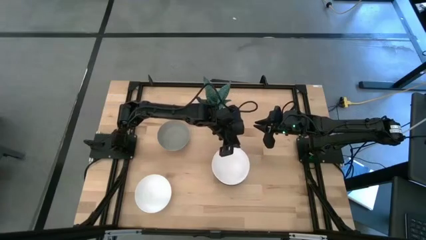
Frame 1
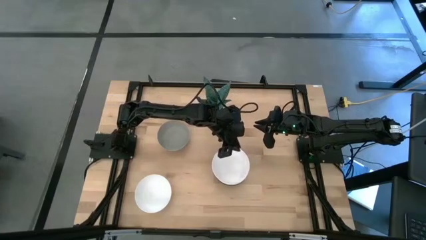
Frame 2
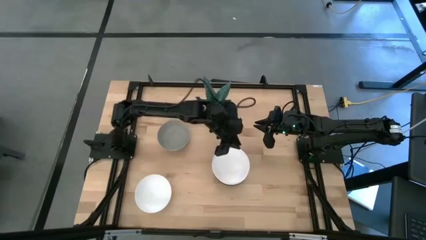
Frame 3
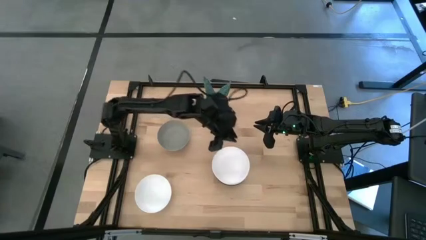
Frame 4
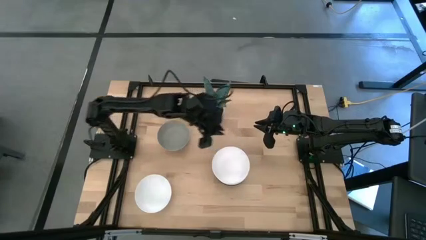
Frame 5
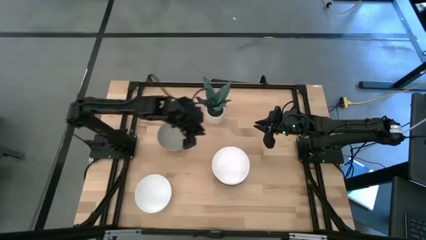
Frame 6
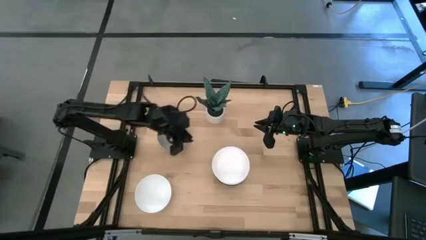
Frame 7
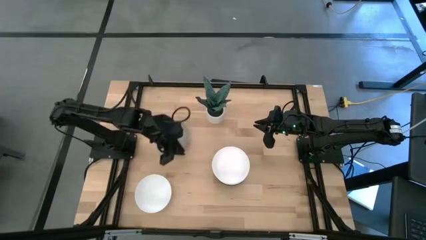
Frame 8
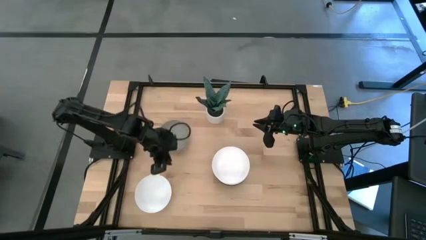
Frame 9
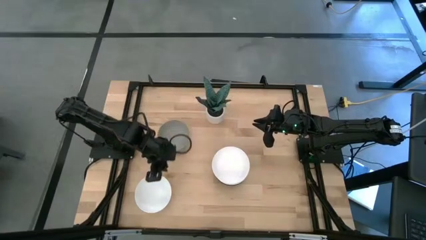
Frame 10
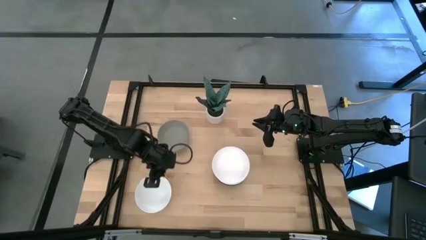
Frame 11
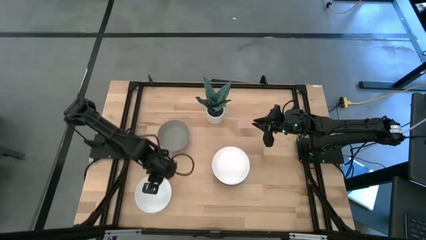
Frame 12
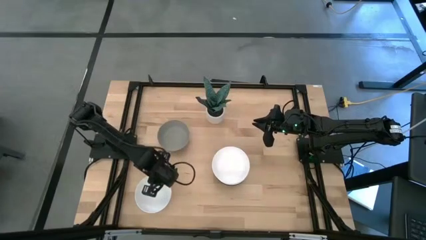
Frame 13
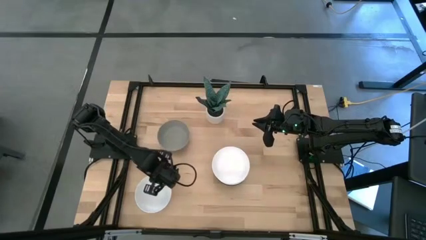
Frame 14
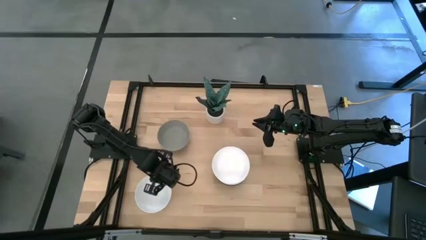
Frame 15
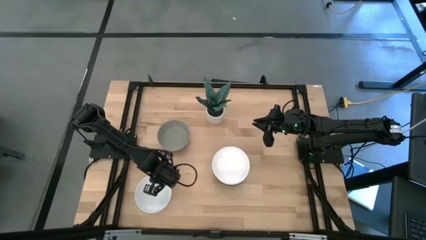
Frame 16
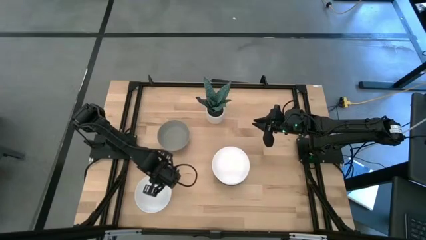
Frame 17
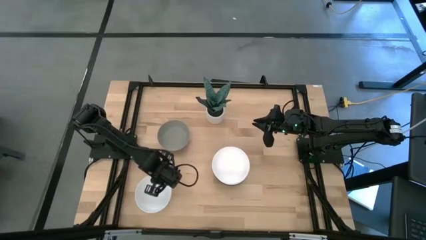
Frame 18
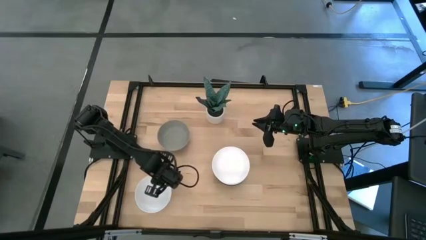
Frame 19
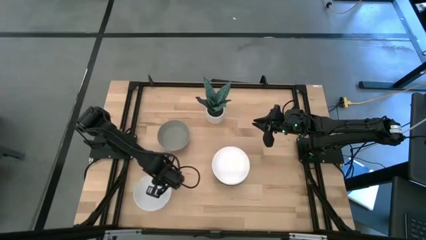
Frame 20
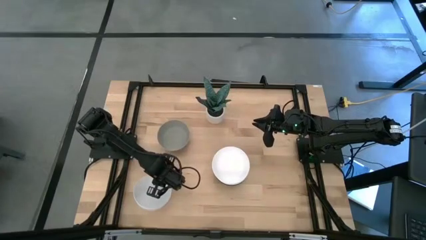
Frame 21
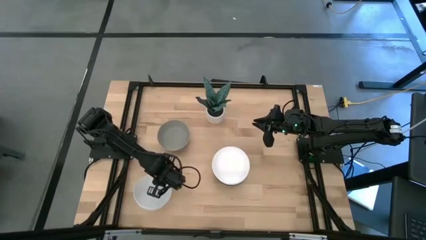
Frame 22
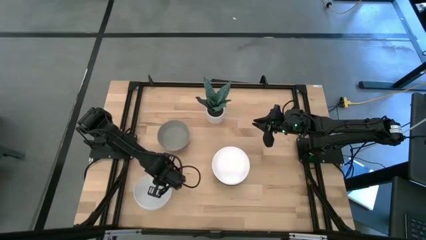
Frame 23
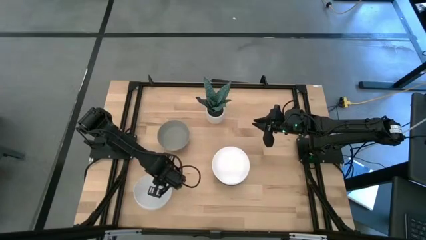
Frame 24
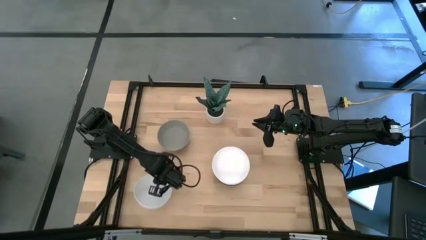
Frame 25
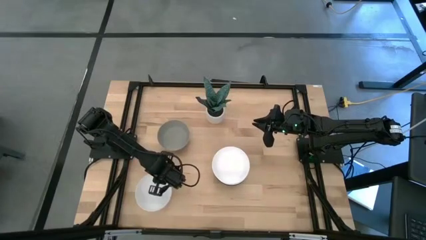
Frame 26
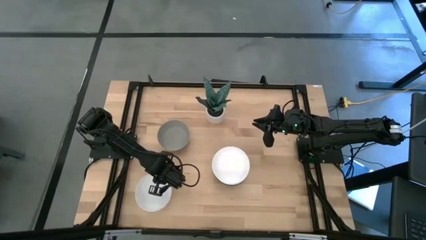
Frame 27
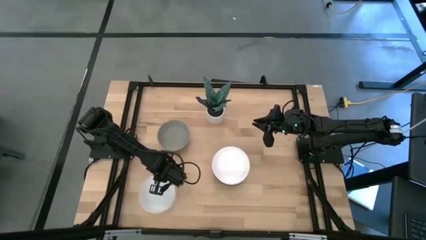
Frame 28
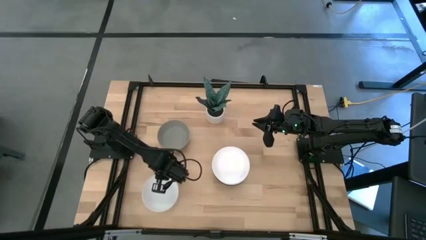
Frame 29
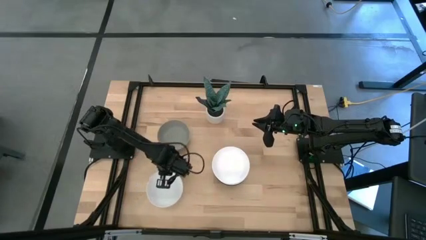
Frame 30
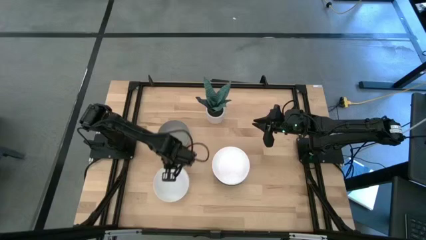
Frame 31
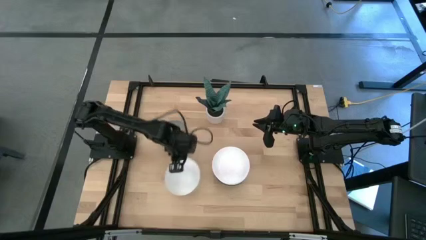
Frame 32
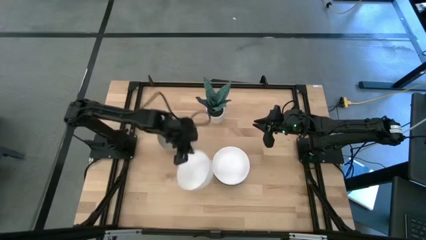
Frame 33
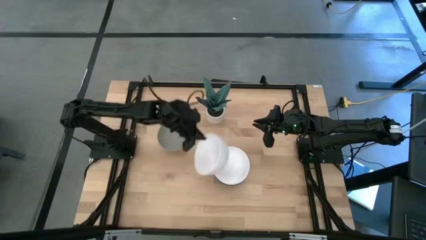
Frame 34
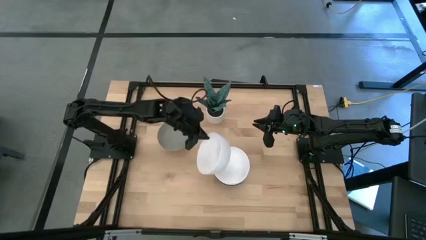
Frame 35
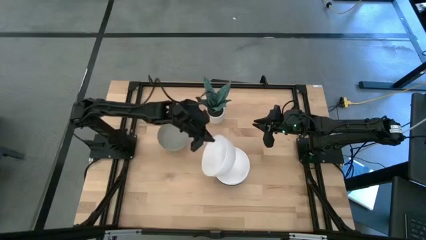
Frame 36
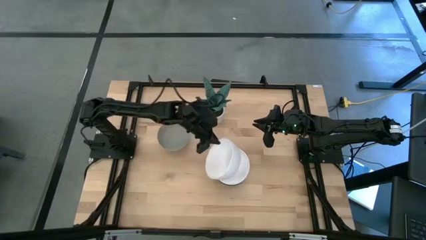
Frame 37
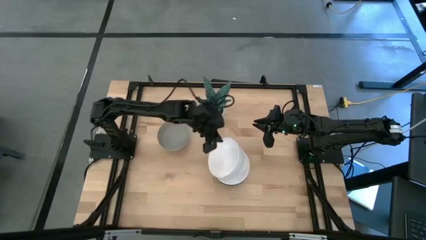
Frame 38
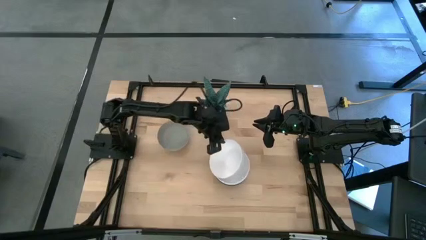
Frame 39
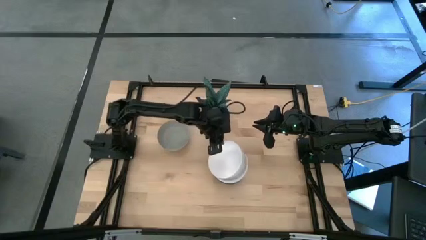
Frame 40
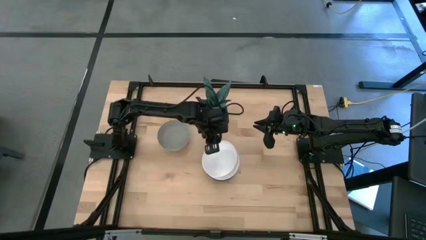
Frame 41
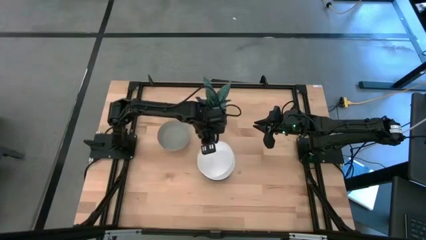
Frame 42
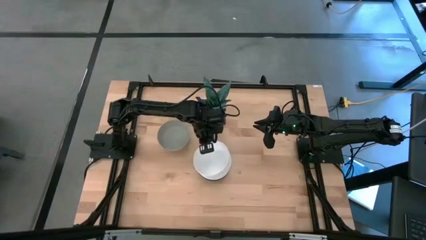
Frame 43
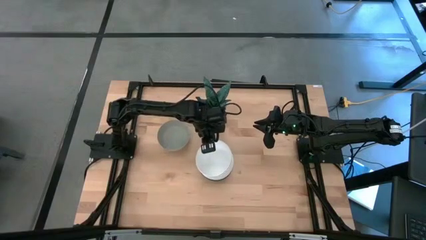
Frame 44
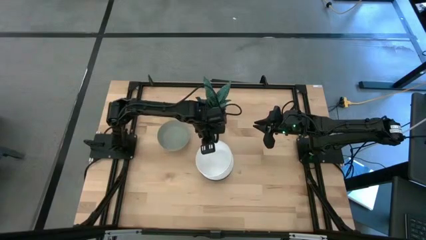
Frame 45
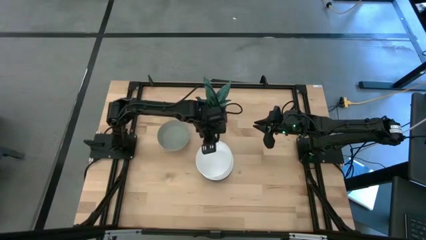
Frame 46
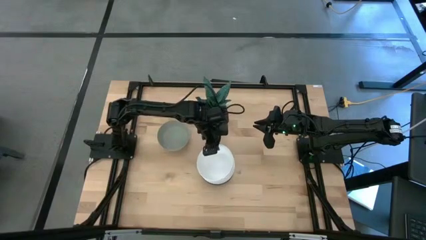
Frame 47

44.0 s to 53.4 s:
Task: Nest bowls inside each other
Stack the white bowl on the other white bowl

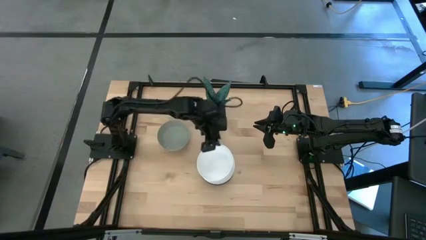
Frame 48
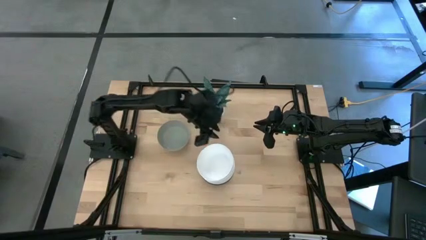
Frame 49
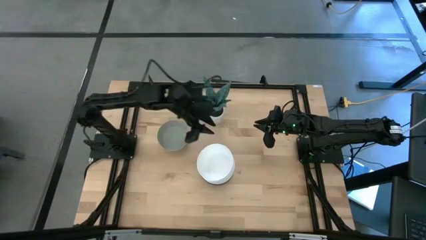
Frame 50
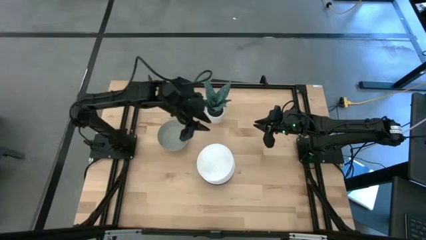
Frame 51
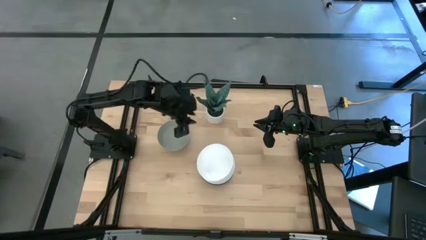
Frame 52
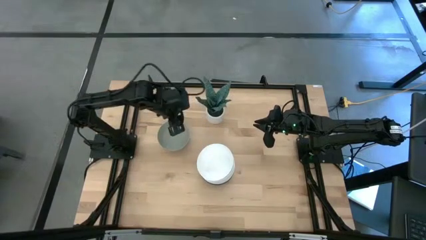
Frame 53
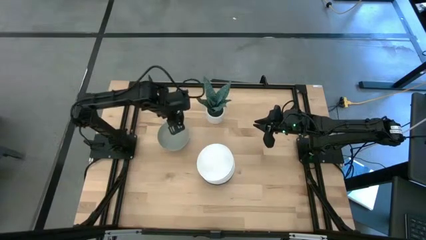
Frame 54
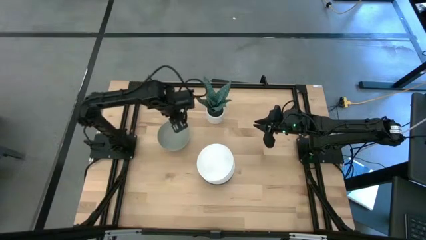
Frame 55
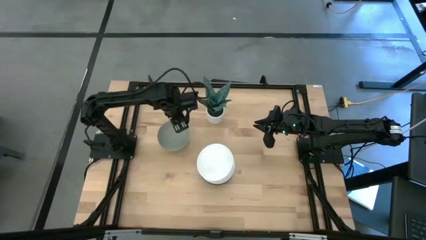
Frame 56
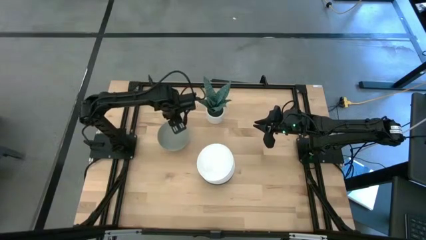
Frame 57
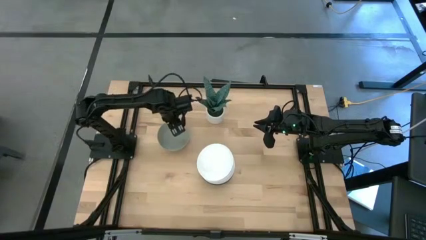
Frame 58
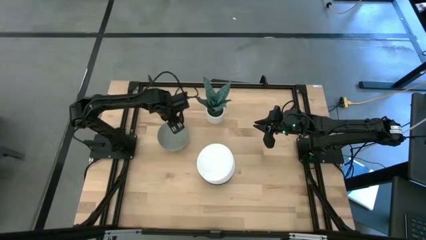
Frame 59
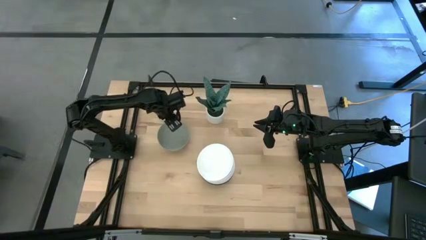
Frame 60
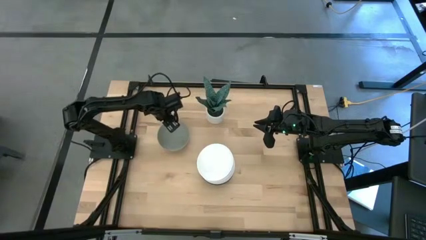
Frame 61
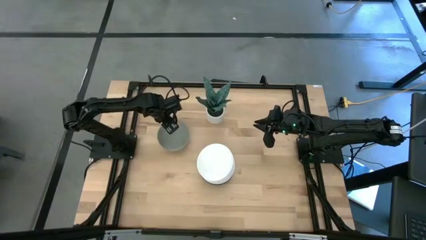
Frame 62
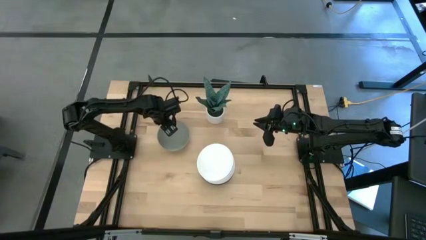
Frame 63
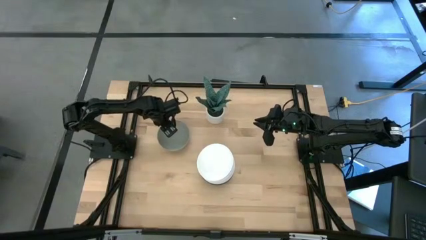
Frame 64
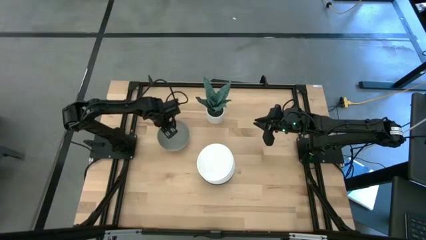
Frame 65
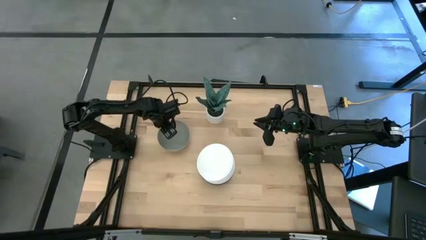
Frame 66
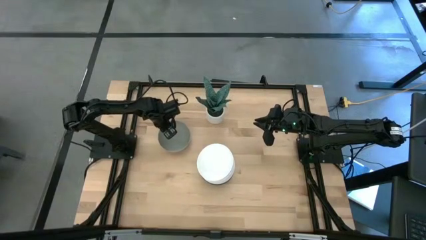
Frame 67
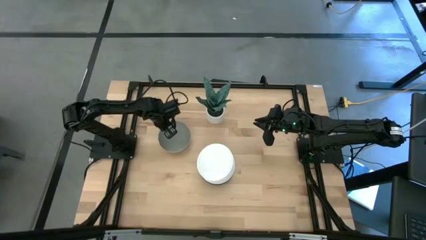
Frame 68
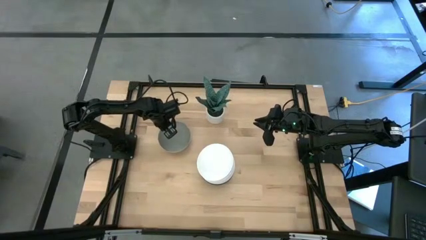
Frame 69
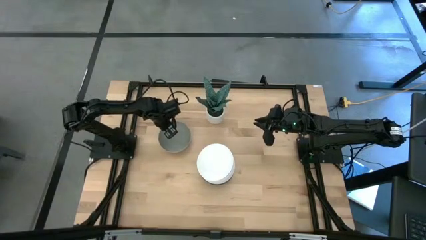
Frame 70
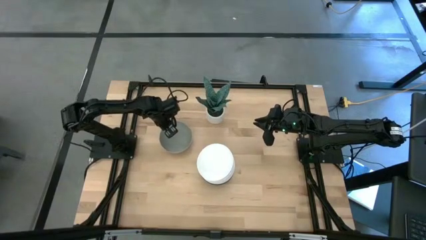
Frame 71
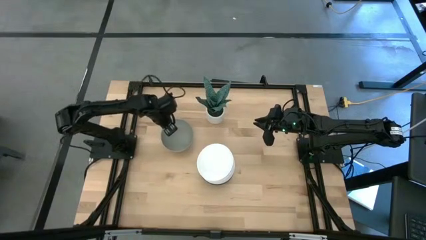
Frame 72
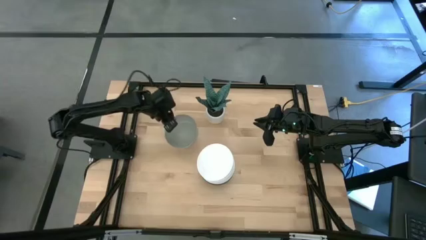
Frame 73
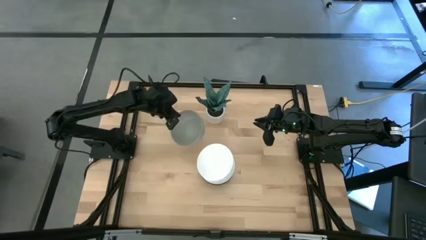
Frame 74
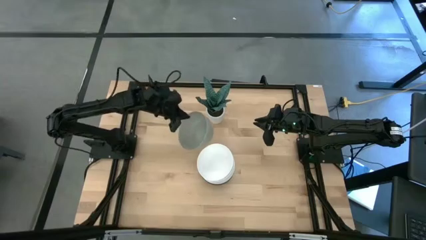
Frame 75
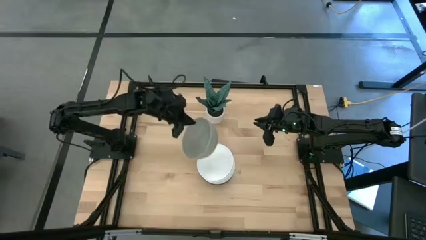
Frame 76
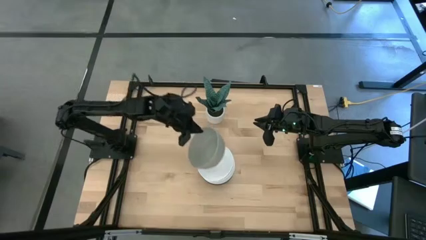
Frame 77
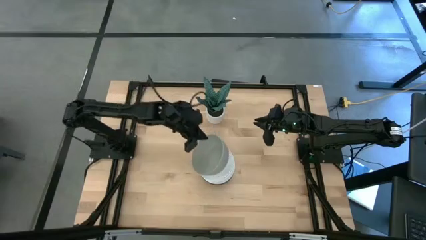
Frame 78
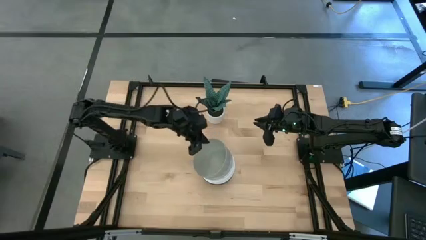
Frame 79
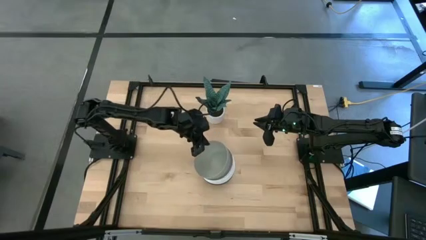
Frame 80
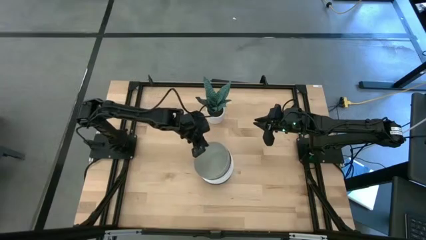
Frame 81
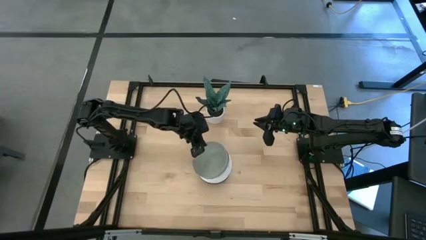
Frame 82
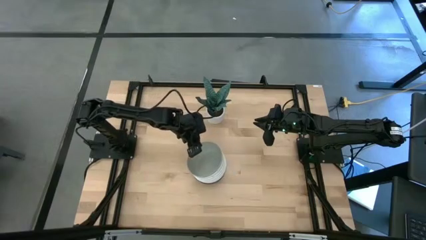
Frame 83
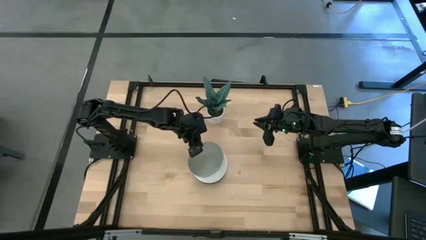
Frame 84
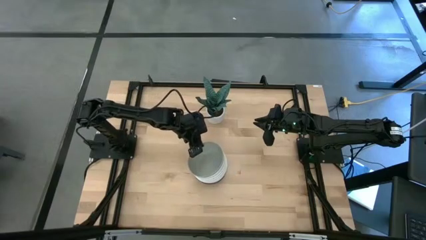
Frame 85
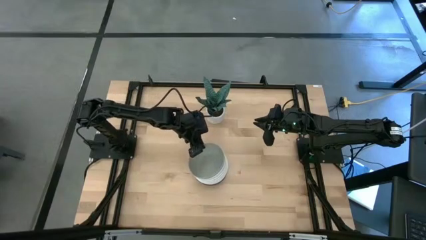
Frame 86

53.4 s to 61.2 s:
Stack the gray bowl on the white bowl
